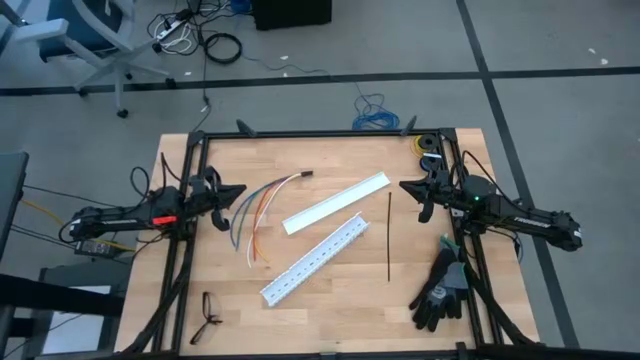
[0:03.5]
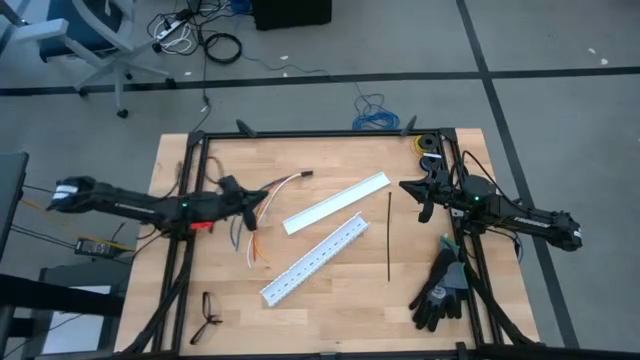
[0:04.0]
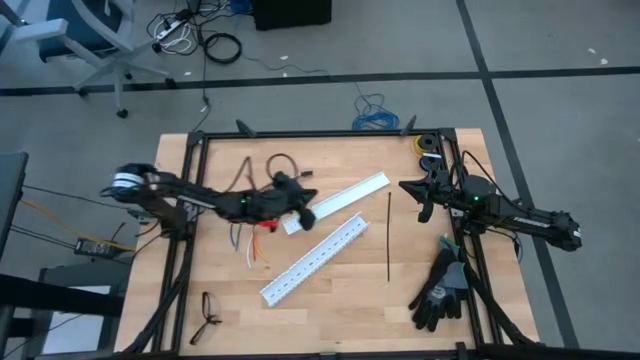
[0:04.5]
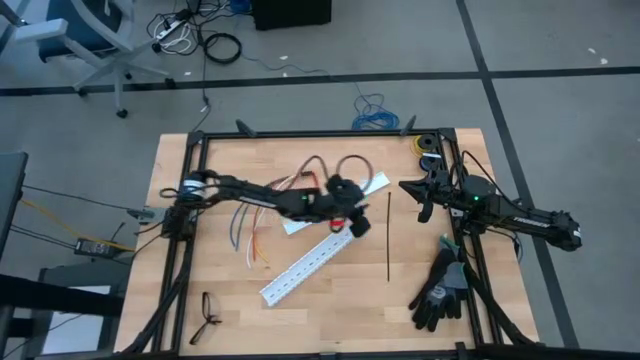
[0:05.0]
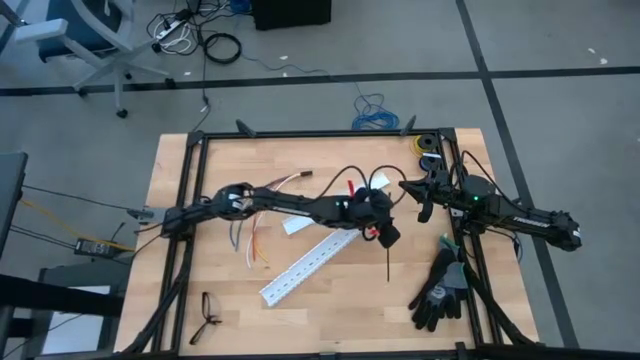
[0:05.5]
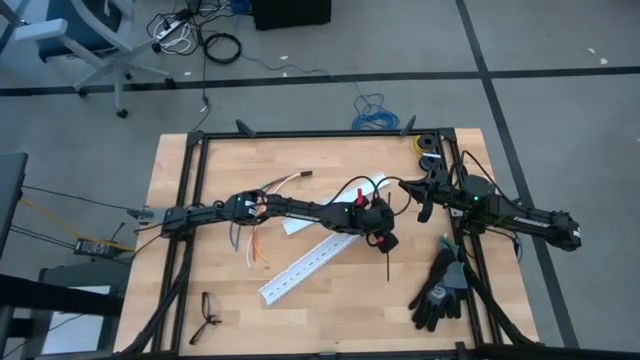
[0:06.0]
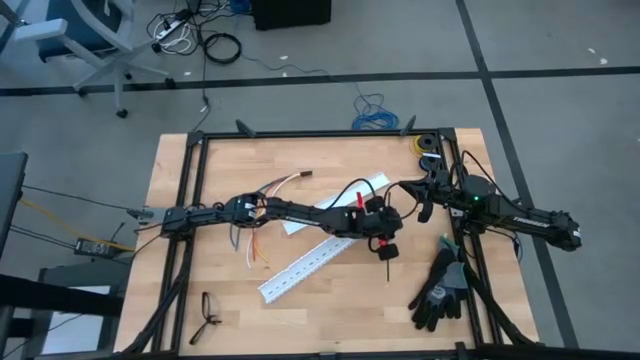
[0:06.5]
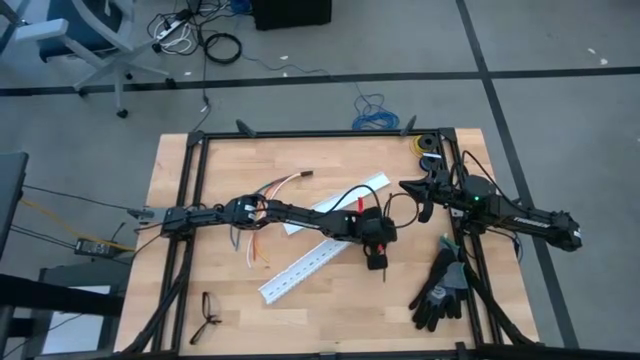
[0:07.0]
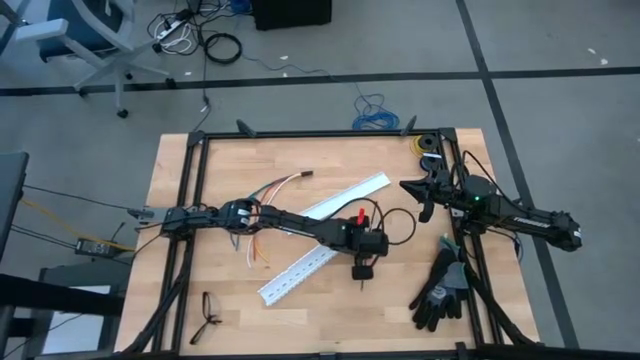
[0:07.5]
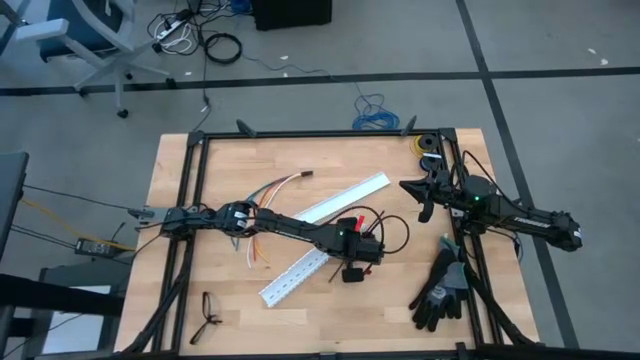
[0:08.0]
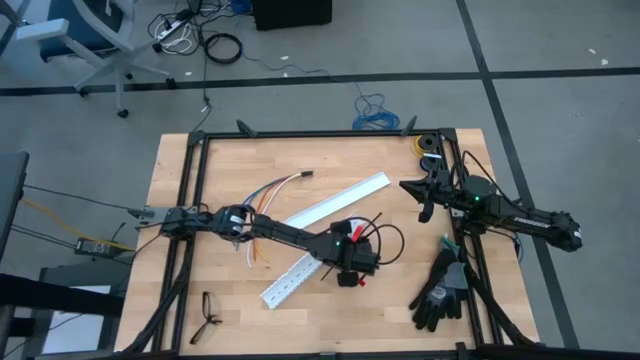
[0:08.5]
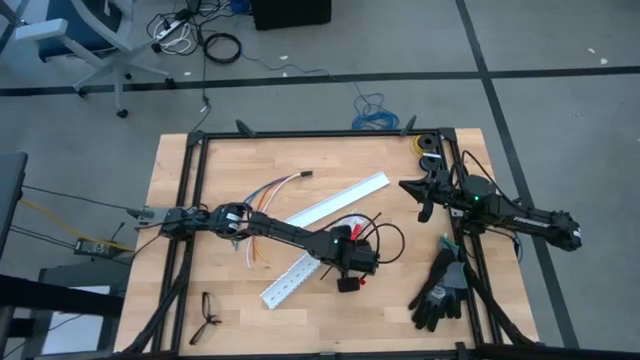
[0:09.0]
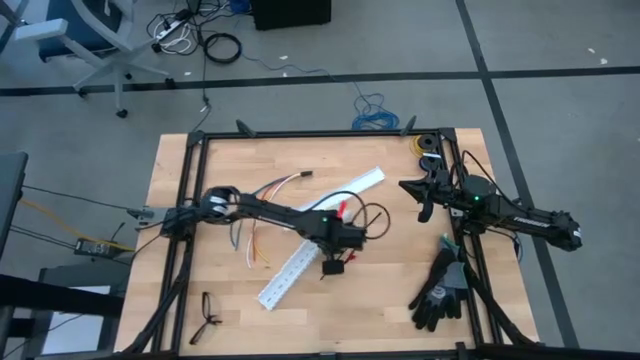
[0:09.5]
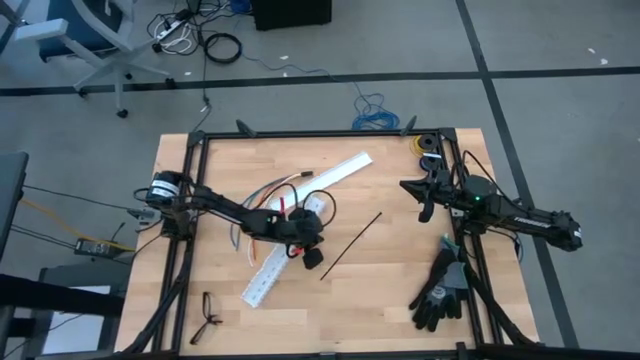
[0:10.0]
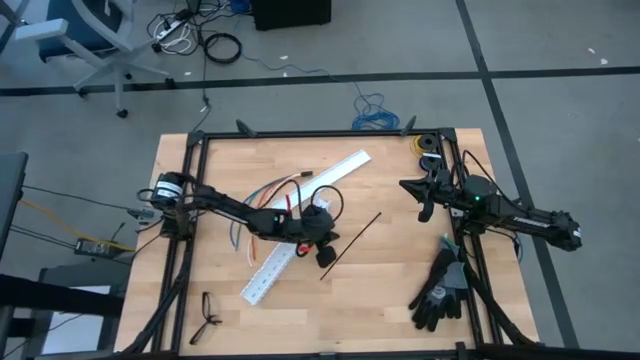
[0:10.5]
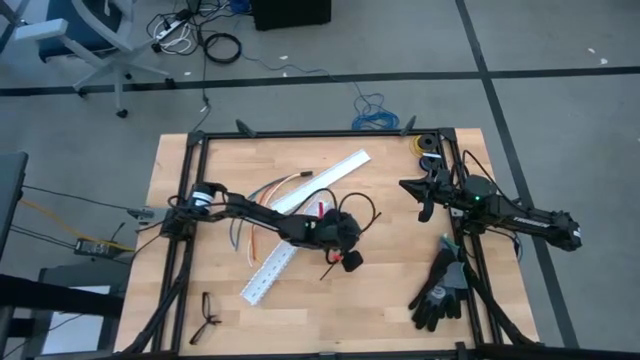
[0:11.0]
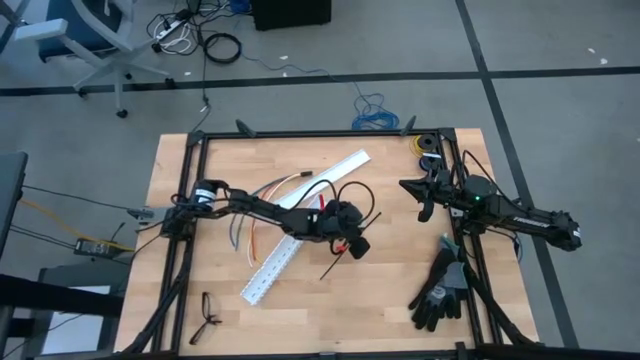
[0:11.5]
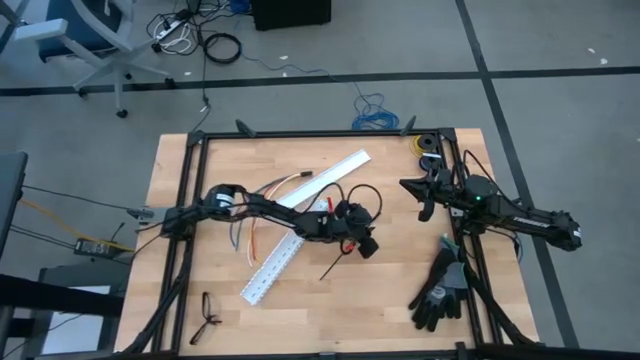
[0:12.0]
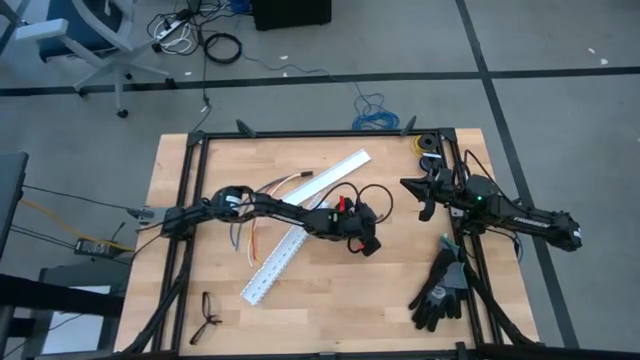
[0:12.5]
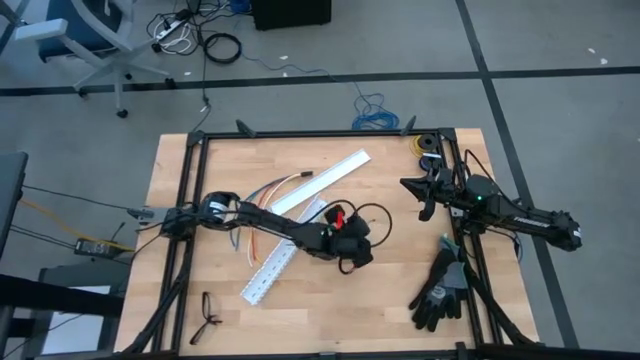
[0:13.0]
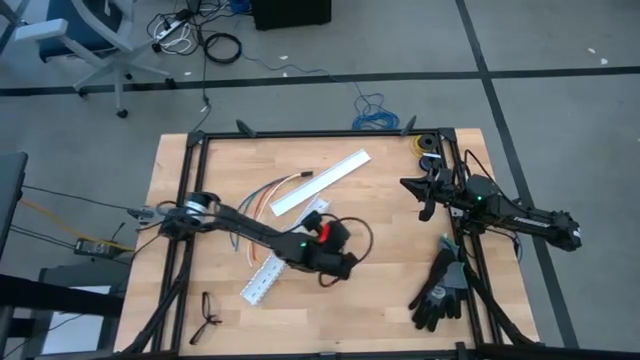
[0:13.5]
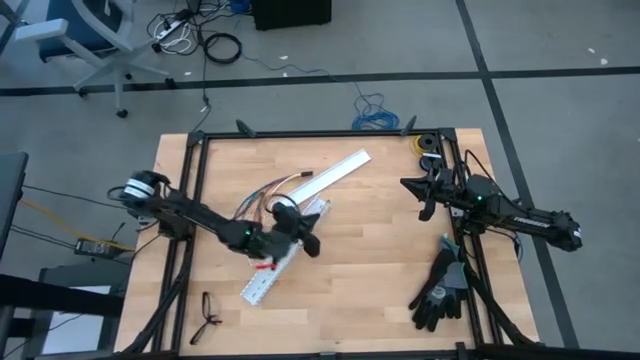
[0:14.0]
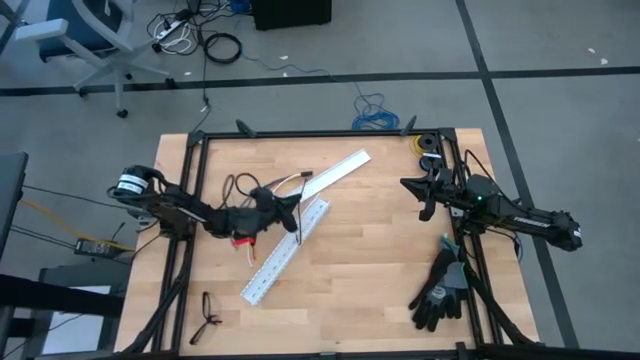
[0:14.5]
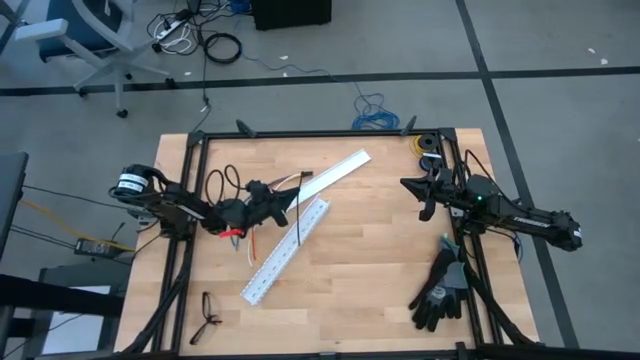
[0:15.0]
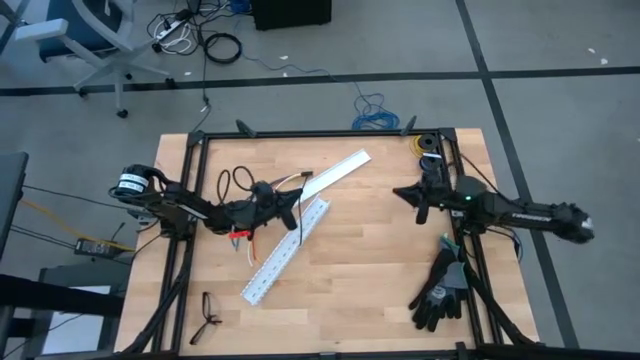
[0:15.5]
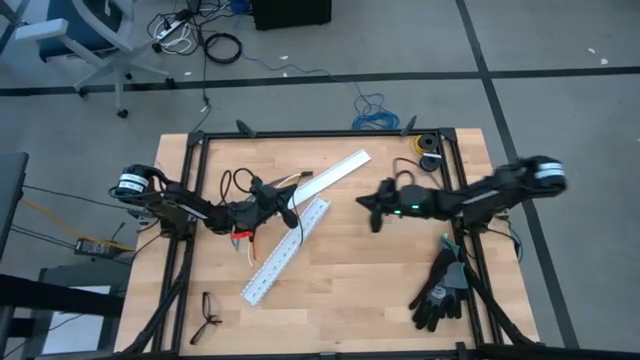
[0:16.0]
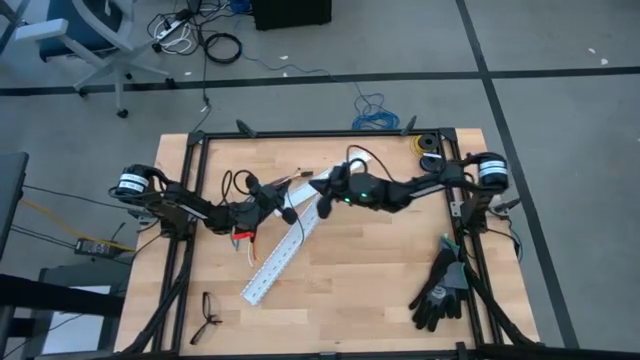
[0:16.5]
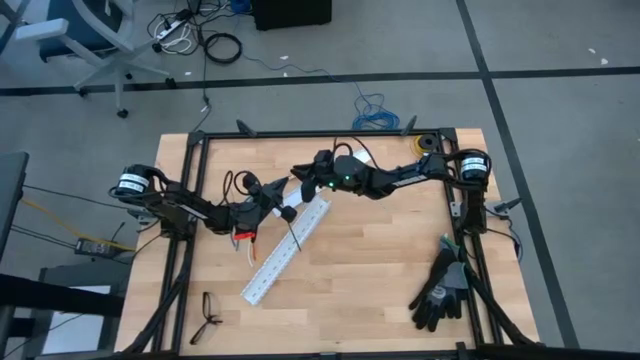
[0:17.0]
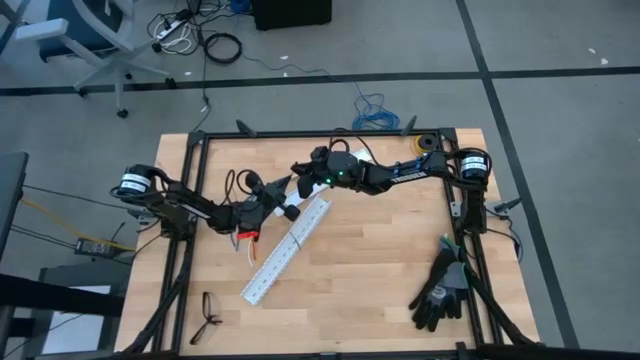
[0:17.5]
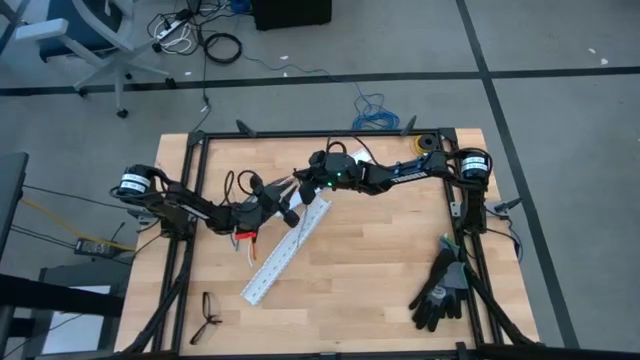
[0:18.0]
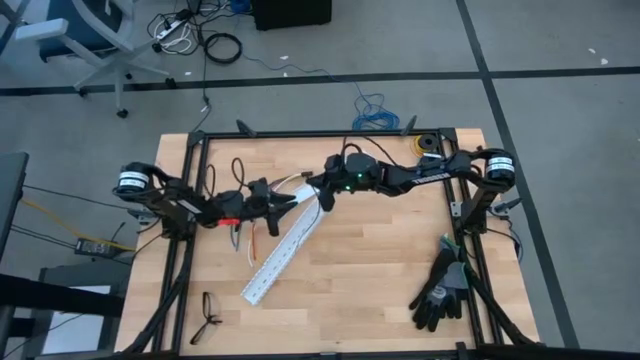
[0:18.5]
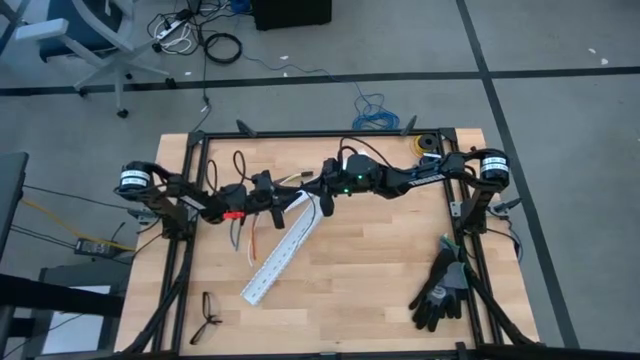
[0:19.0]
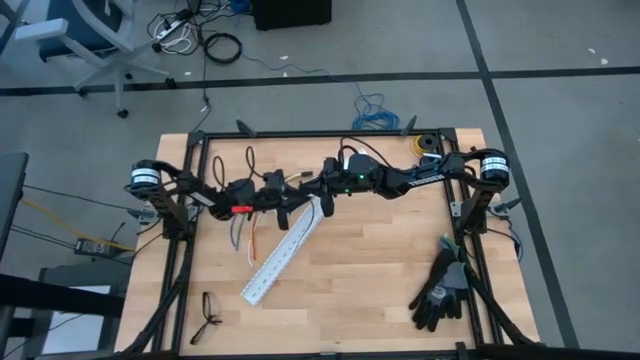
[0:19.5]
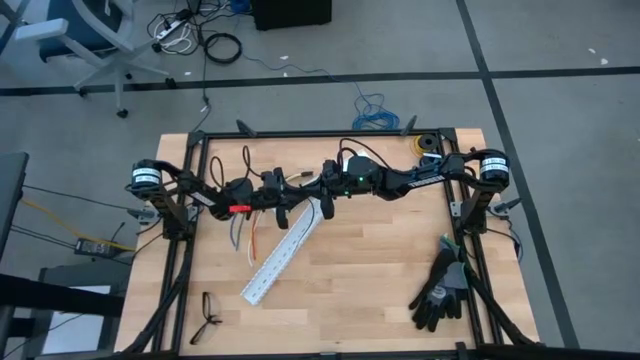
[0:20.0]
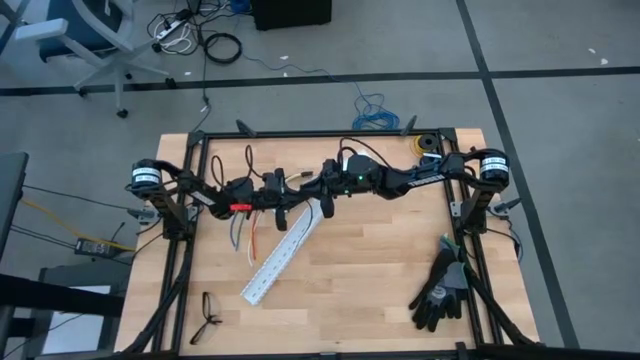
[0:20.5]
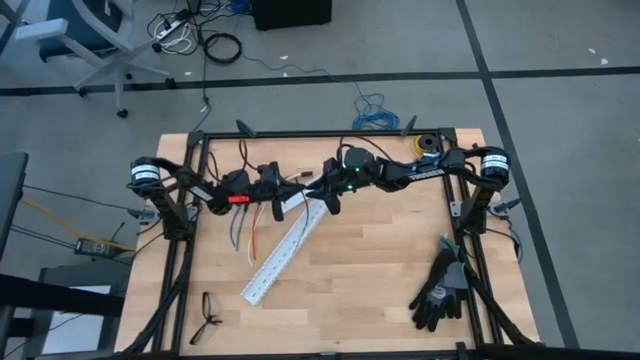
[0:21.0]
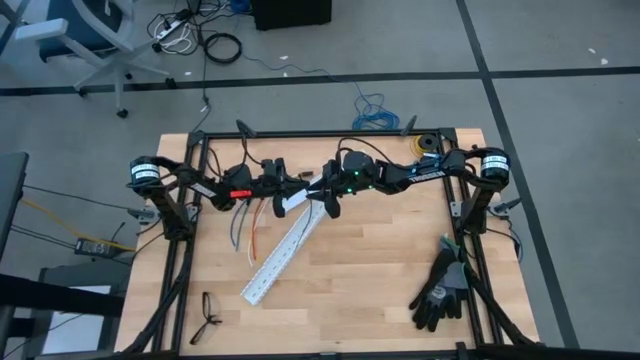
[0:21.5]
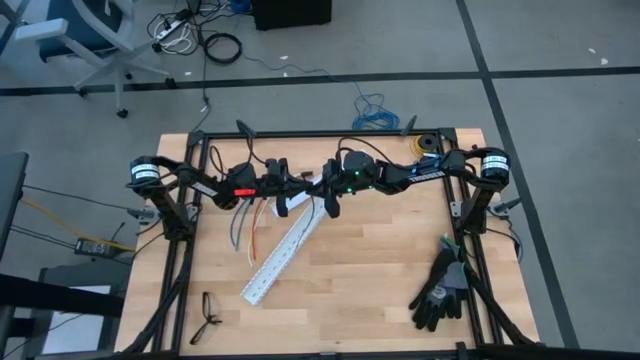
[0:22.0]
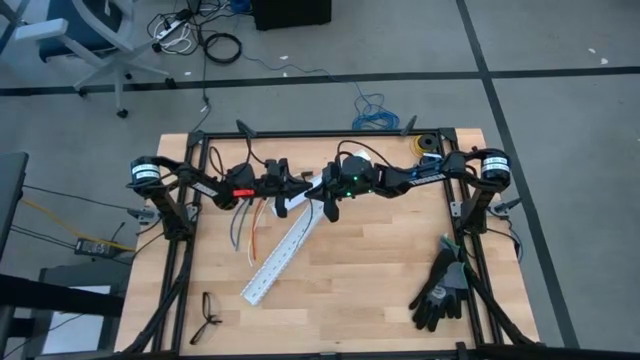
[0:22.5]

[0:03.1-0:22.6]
Task: Ziptie cables
Wrap the cable wires with the black zip tie
